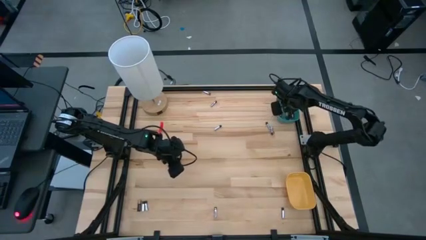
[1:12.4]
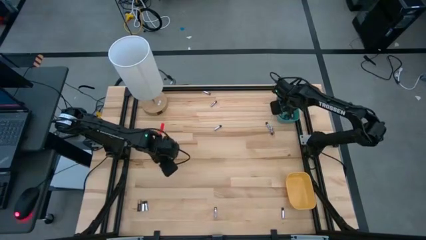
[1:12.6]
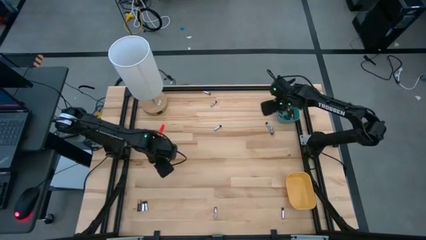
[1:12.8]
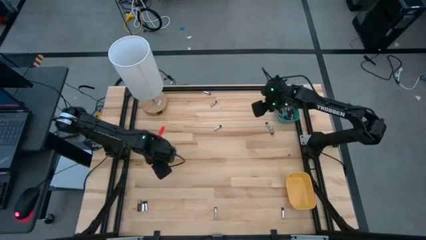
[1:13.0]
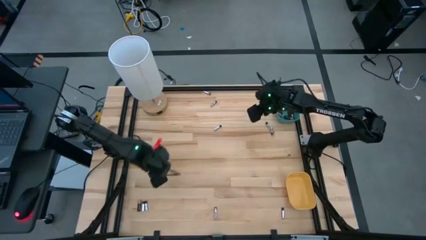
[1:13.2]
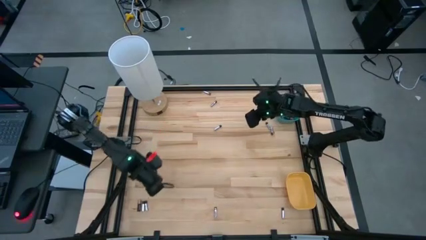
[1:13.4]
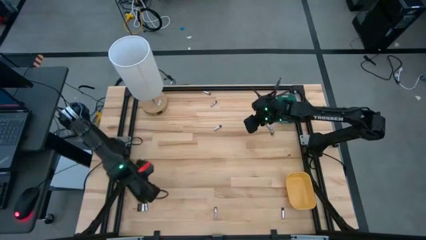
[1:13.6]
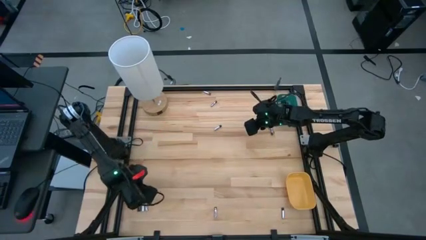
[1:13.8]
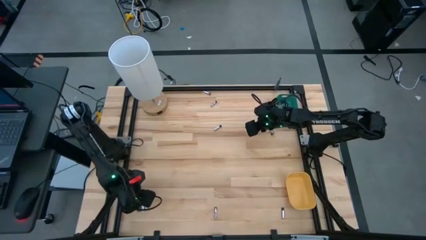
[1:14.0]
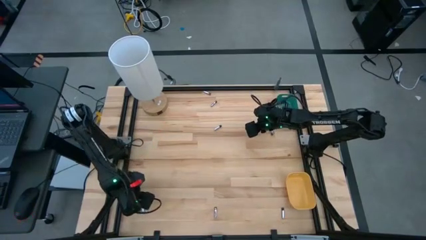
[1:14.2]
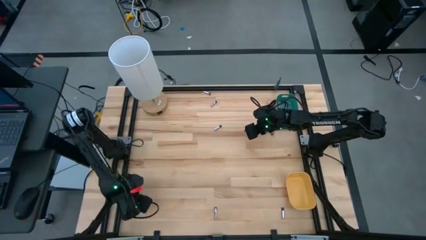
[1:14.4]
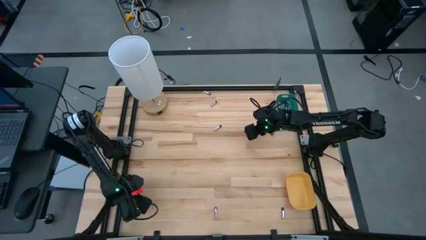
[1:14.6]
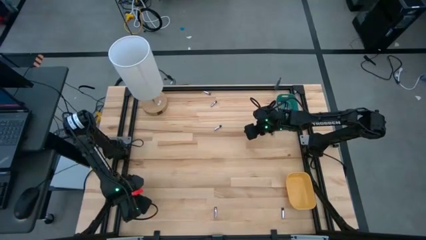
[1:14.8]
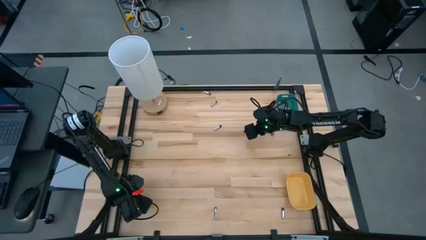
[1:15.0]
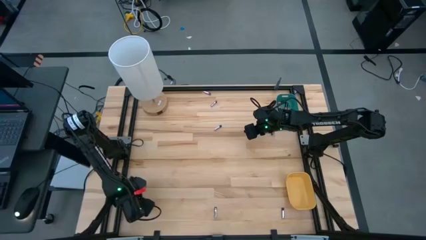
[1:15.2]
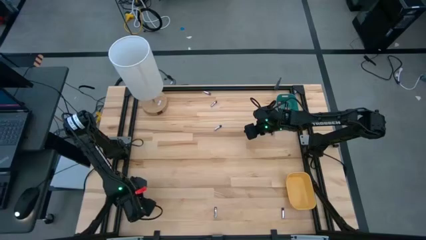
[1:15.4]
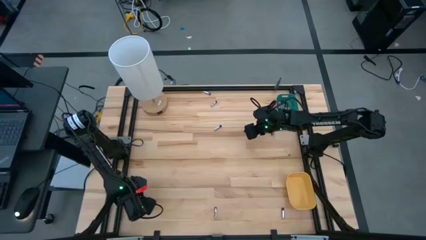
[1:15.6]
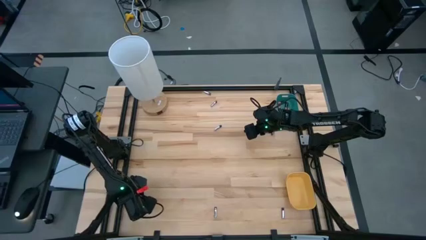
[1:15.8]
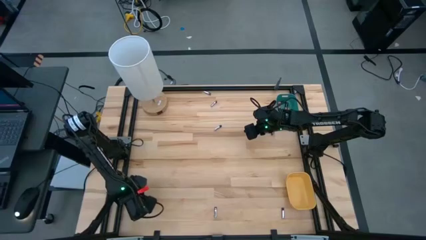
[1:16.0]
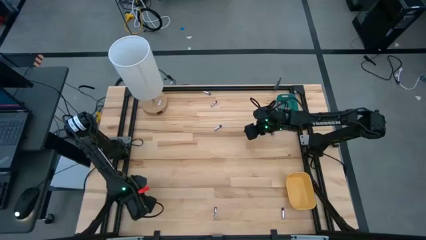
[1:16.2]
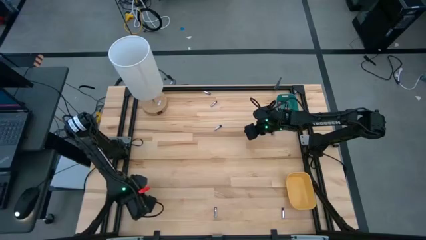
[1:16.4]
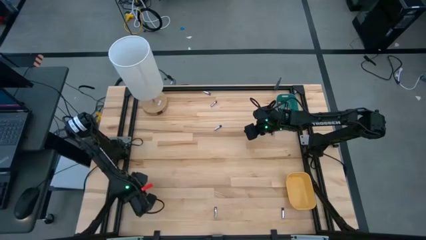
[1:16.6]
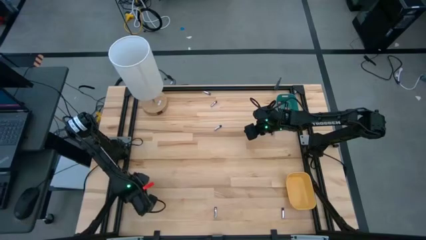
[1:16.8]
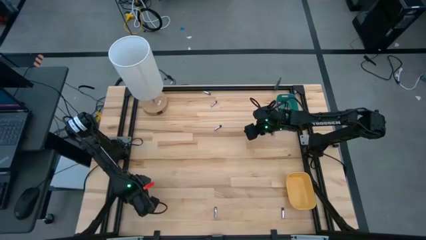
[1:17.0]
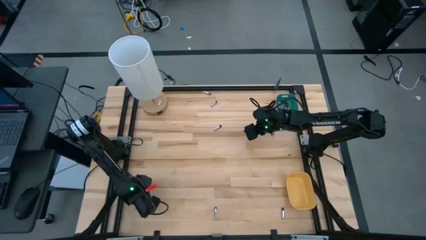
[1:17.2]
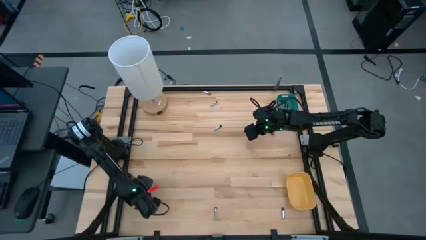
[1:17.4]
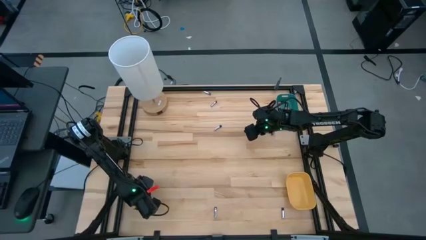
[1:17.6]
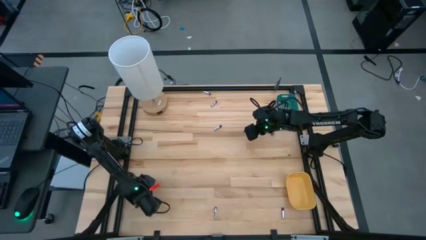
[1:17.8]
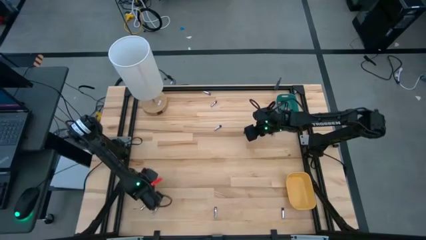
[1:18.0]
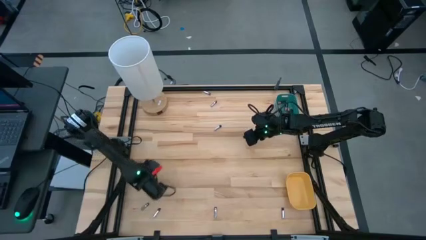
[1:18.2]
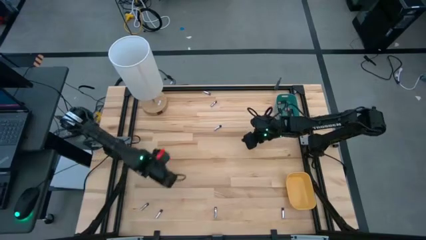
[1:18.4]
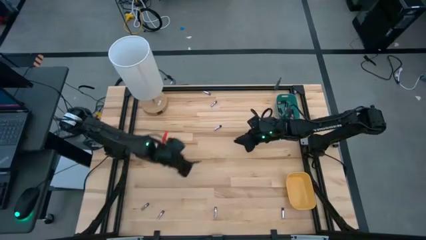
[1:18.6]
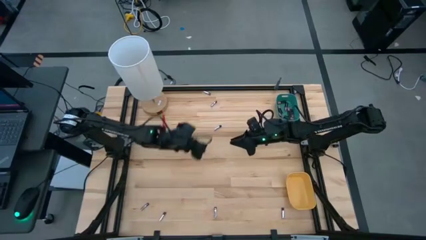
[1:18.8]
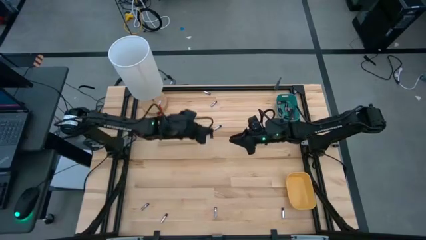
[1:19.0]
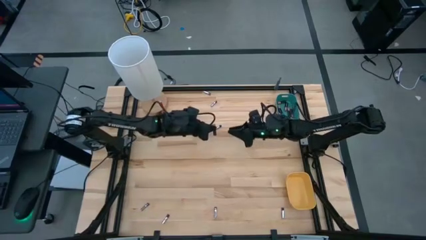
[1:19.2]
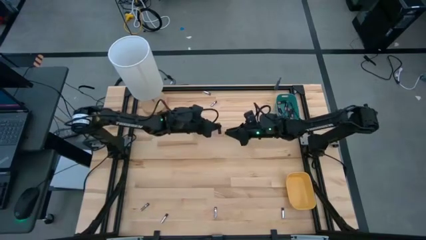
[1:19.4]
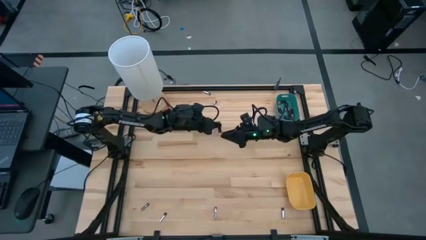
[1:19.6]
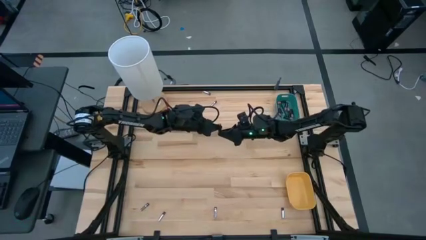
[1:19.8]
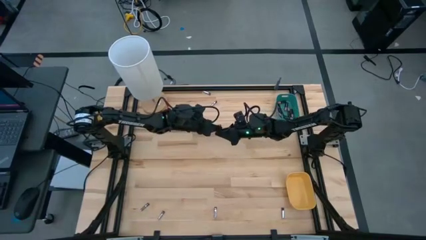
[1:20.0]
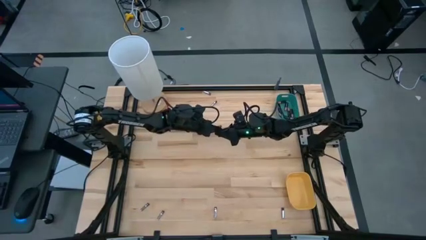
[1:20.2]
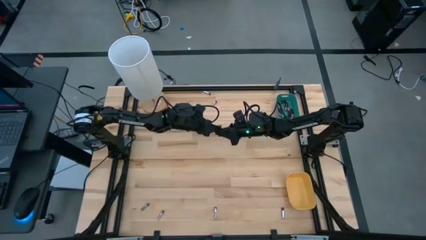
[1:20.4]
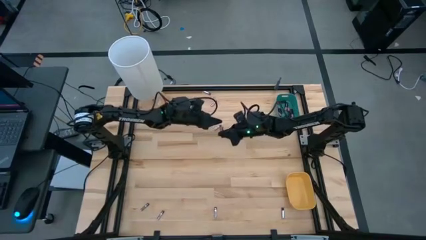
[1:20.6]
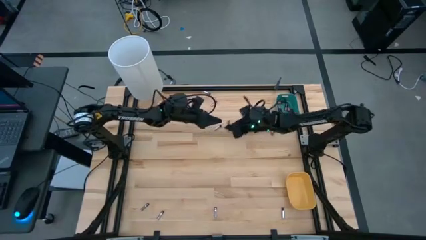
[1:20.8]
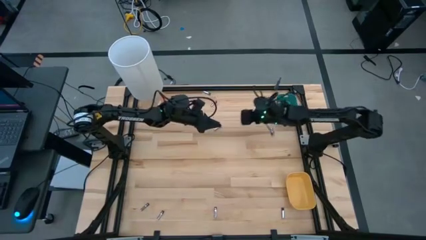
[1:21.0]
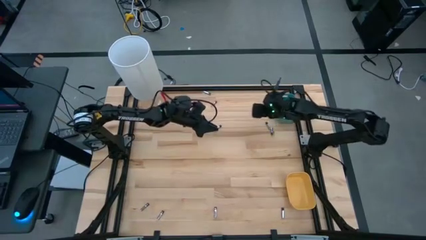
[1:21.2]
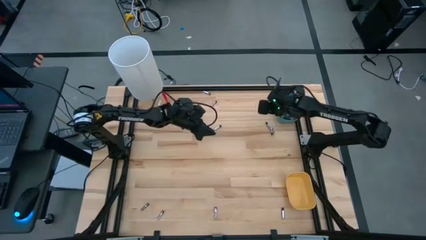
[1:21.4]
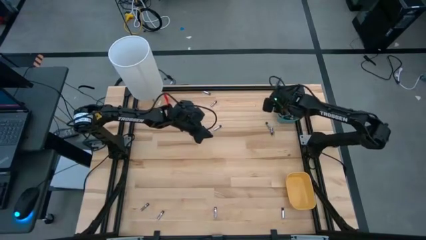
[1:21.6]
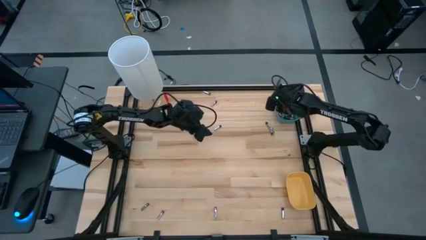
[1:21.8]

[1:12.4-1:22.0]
Task: Sort batteries
Put the black battery into the blue bin

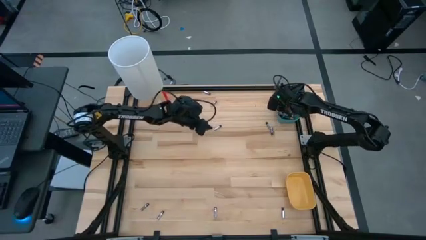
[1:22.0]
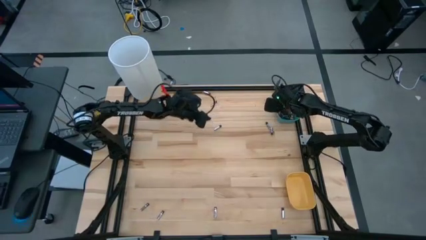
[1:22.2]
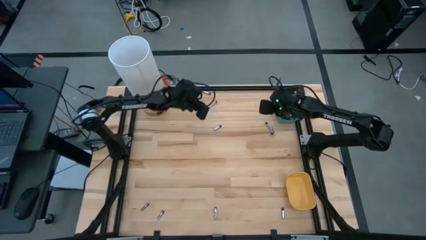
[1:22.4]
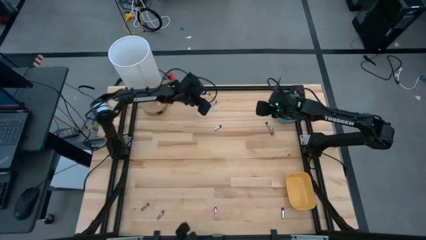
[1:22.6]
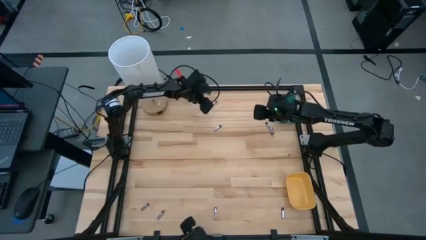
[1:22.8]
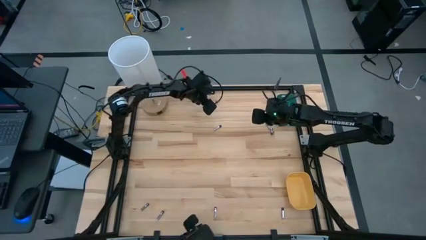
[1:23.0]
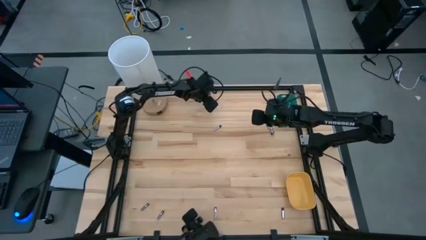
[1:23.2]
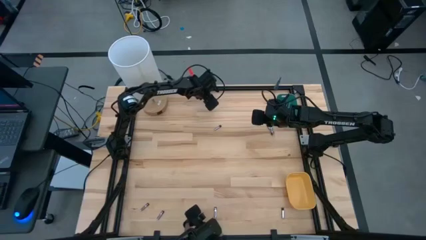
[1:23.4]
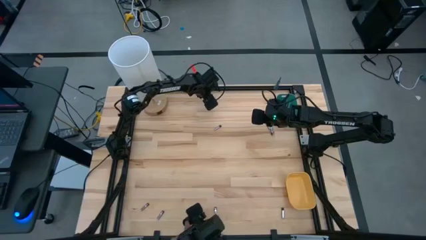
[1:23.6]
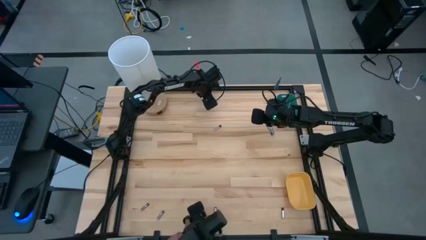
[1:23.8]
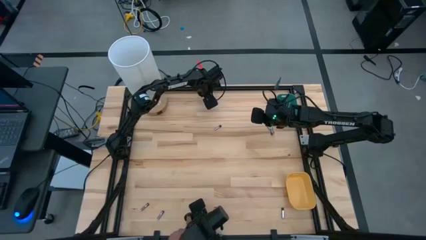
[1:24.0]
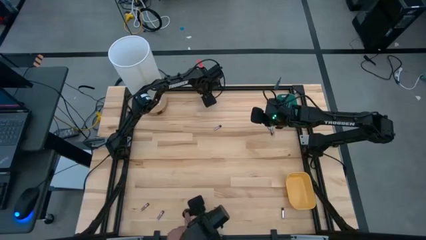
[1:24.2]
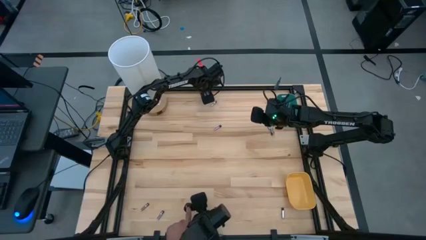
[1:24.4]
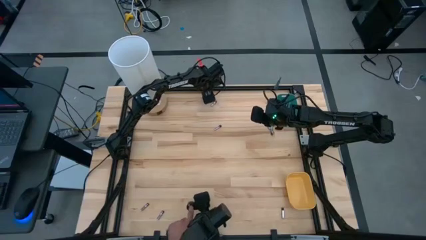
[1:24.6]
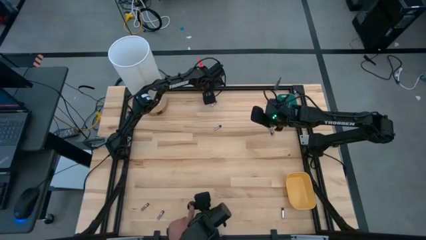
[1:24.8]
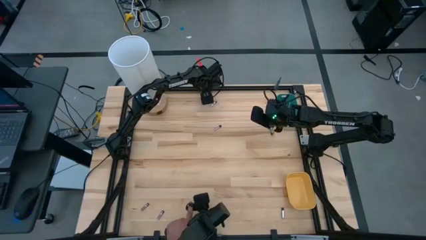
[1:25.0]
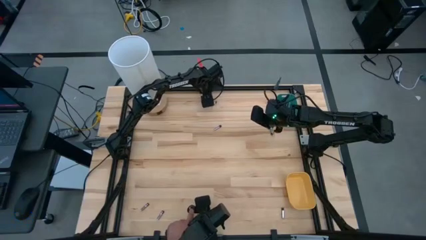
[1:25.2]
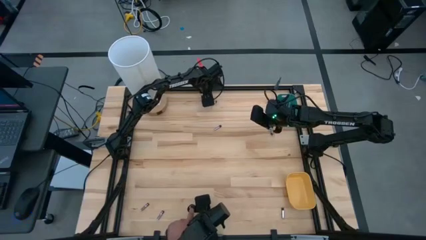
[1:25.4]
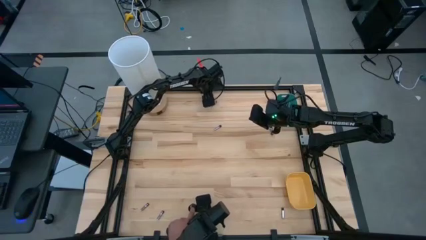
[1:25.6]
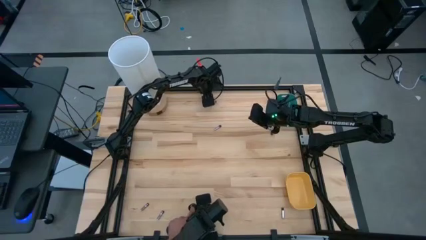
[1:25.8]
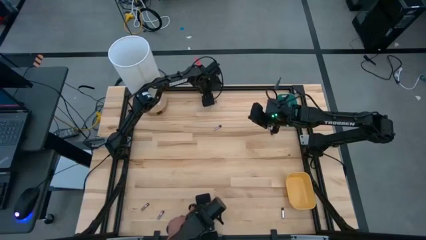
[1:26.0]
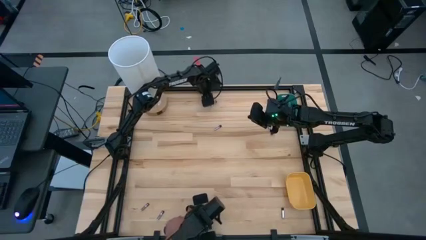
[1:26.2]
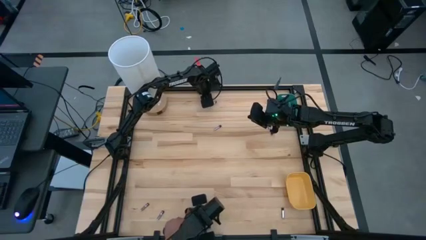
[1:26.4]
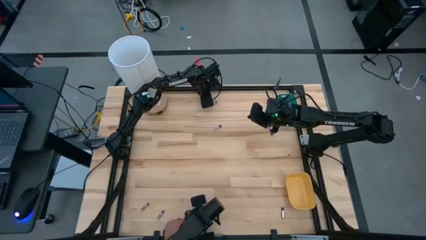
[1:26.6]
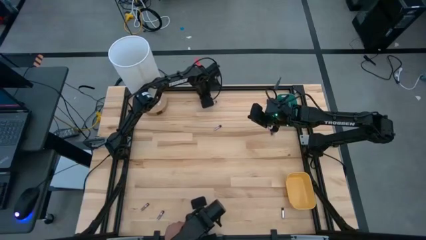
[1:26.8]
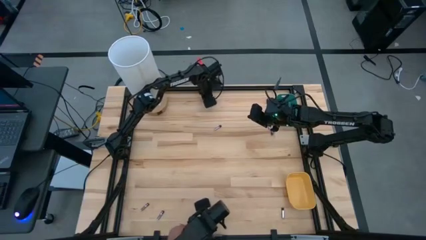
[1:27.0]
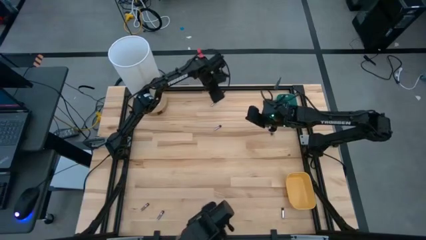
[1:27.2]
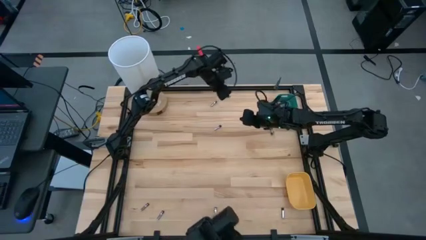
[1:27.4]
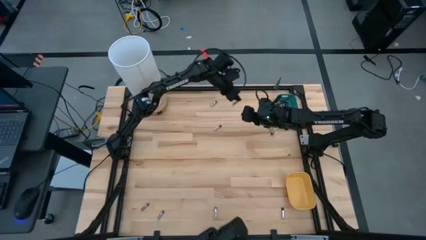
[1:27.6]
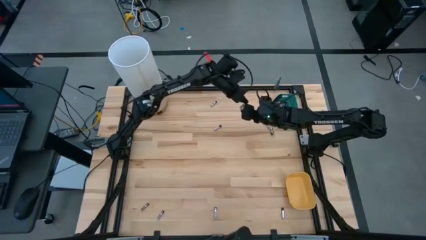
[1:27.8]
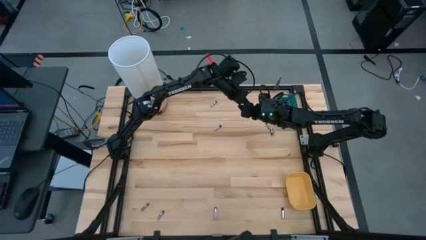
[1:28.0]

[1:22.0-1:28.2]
Put the silver battery into the yellow bin

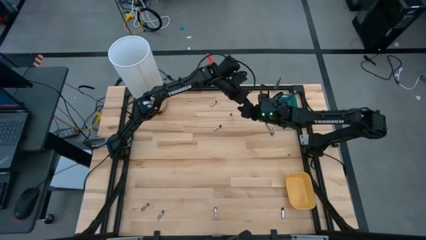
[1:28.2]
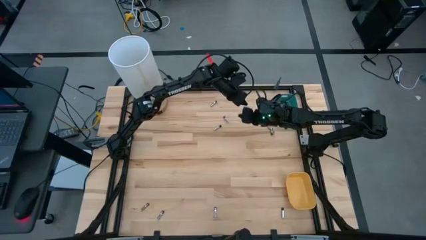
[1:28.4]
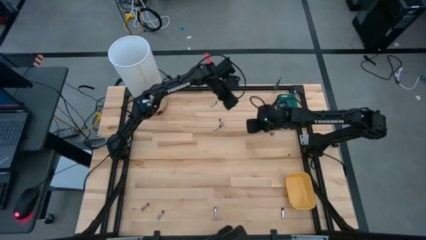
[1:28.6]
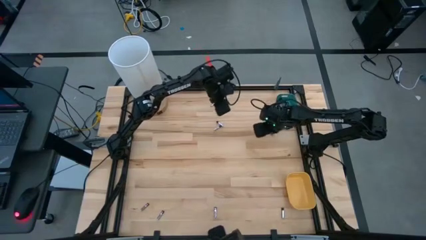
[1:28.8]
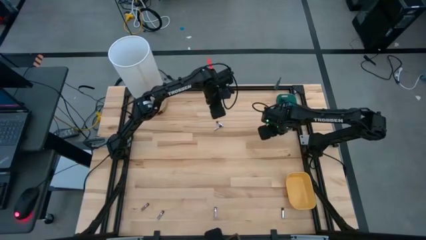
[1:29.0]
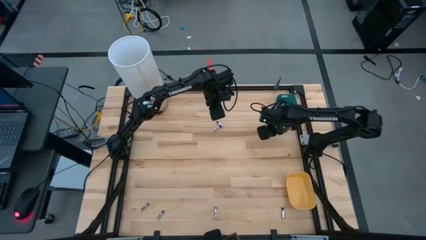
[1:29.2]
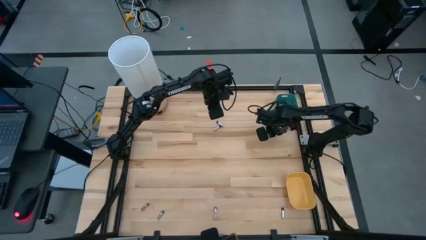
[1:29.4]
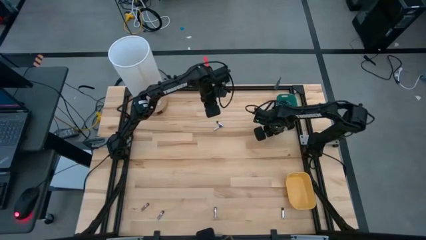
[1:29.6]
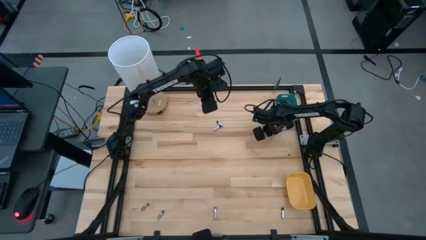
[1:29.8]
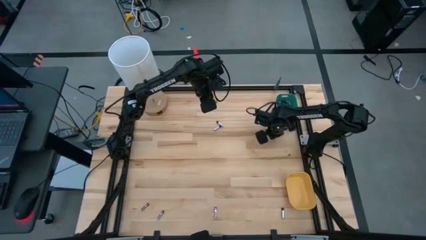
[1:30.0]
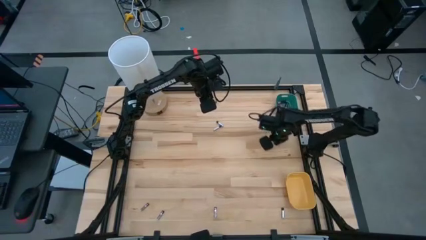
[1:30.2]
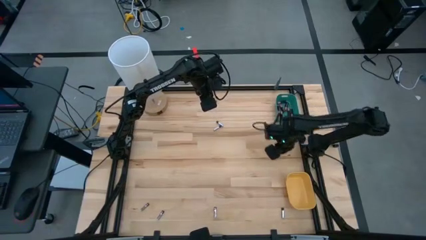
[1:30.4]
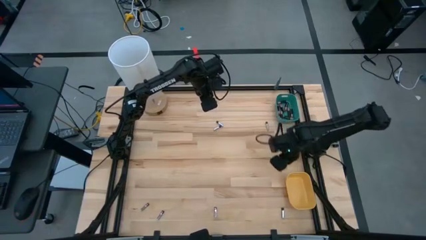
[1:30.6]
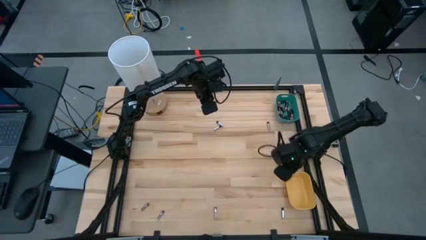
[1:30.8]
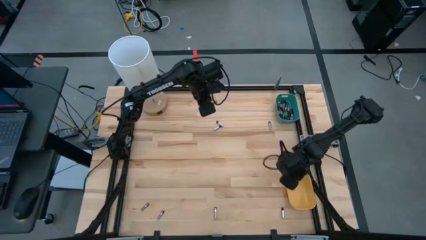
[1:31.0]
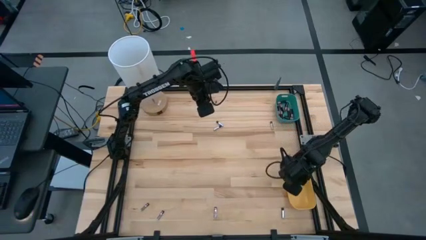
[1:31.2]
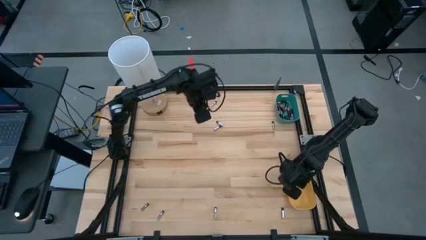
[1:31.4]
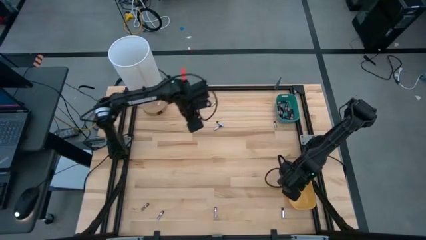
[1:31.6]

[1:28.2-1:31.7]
Put the silver battery into the yellow bin
